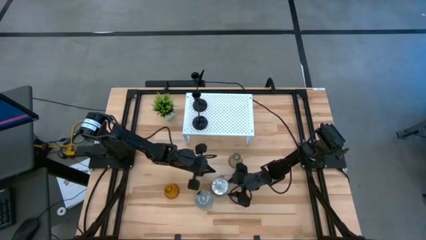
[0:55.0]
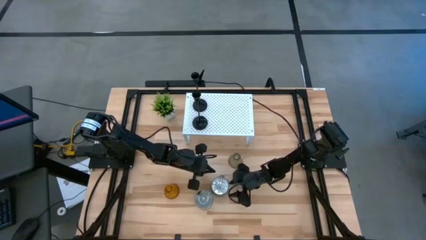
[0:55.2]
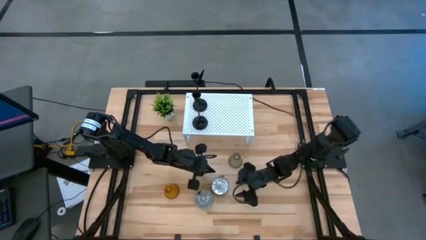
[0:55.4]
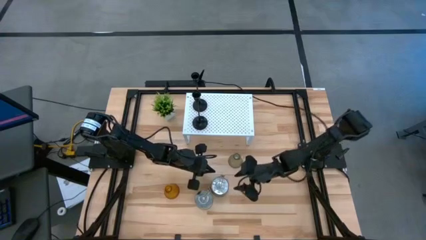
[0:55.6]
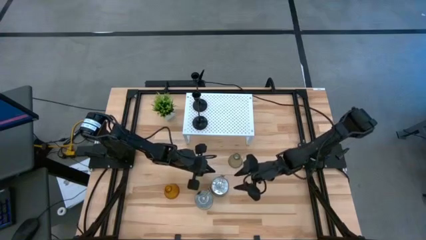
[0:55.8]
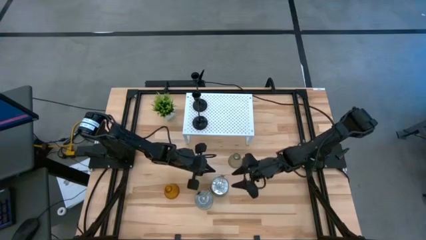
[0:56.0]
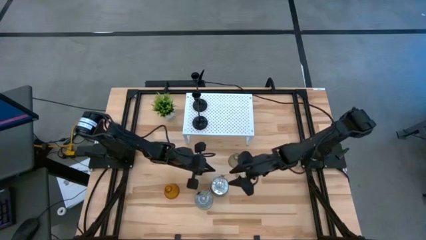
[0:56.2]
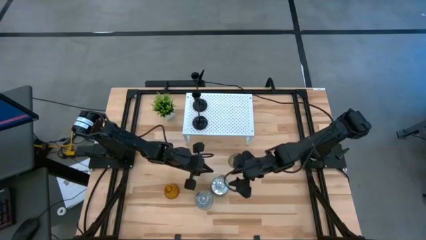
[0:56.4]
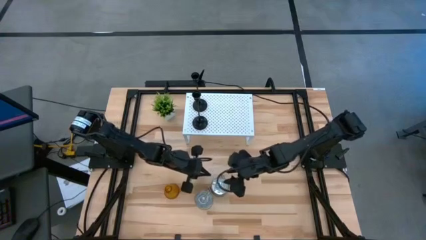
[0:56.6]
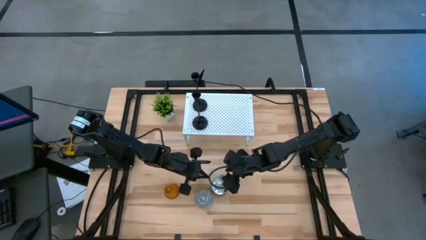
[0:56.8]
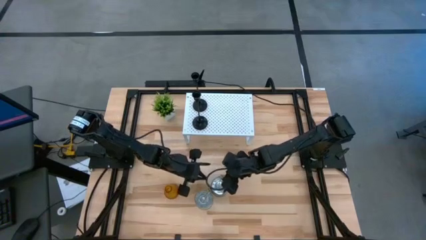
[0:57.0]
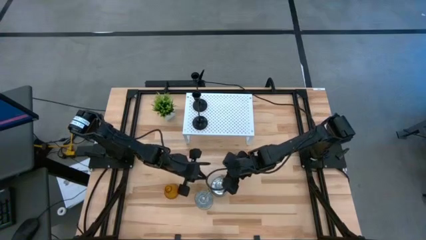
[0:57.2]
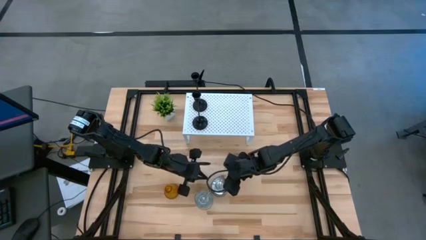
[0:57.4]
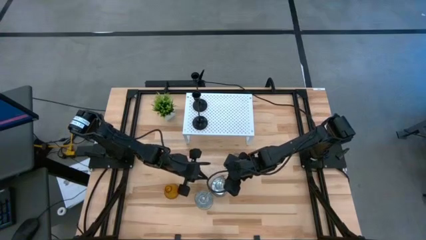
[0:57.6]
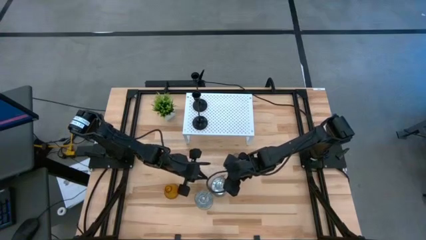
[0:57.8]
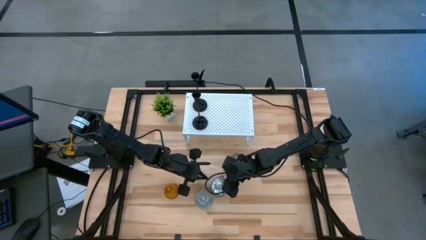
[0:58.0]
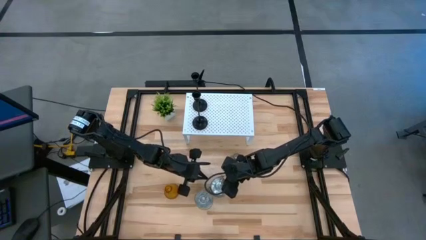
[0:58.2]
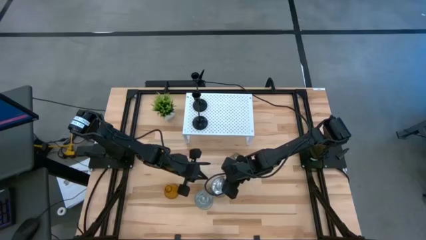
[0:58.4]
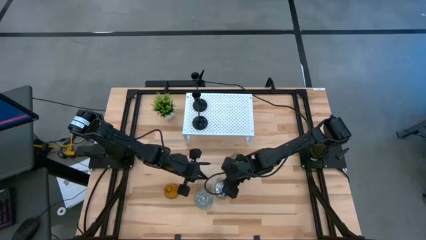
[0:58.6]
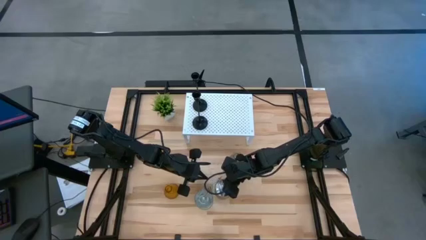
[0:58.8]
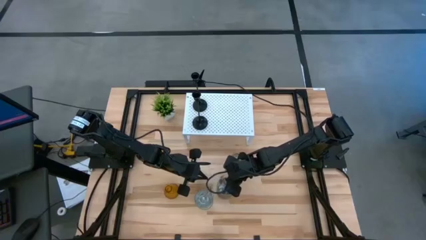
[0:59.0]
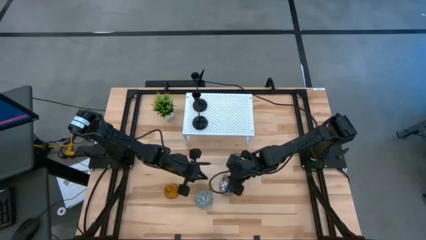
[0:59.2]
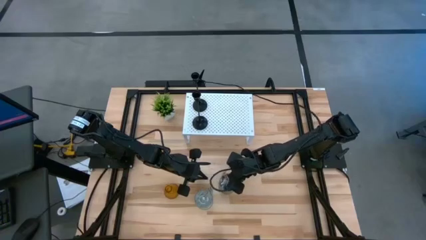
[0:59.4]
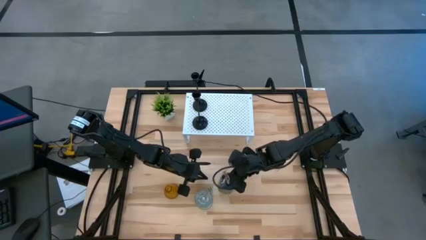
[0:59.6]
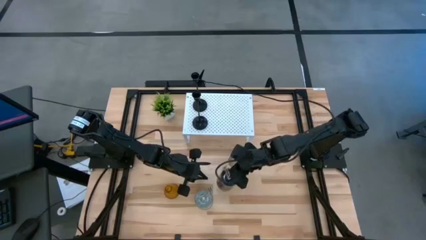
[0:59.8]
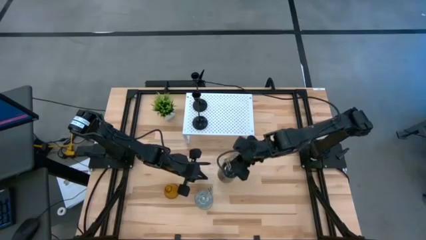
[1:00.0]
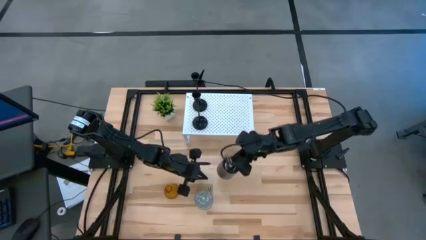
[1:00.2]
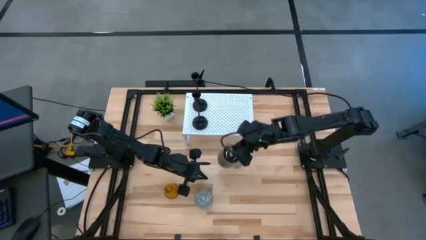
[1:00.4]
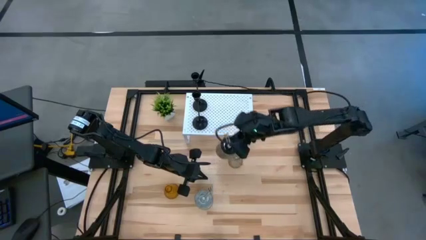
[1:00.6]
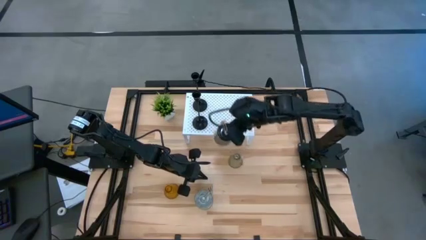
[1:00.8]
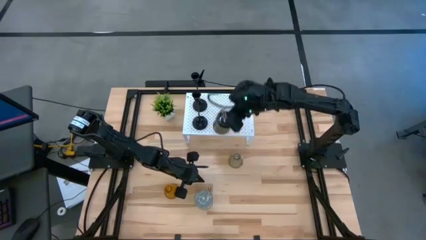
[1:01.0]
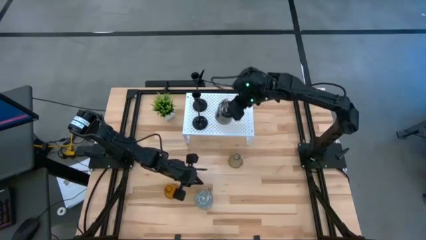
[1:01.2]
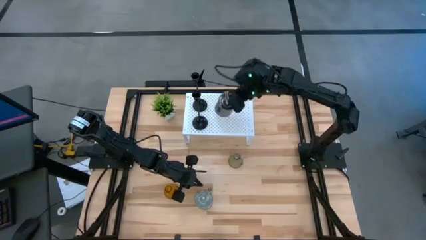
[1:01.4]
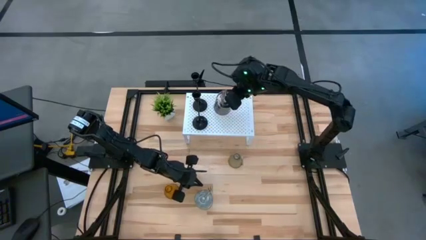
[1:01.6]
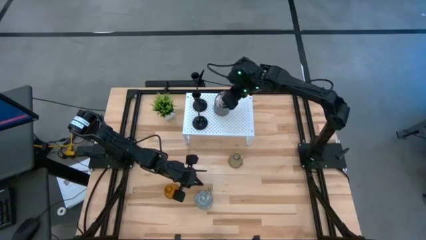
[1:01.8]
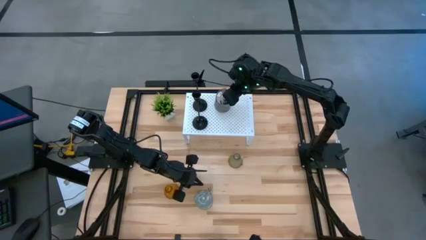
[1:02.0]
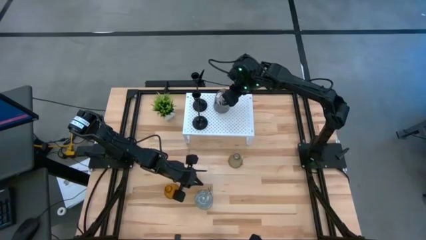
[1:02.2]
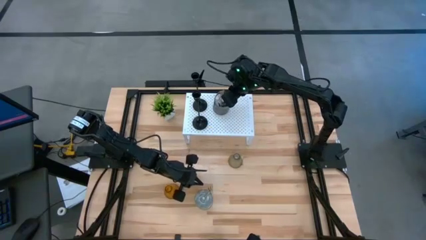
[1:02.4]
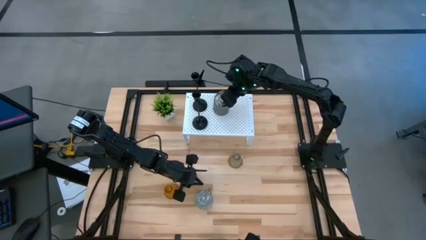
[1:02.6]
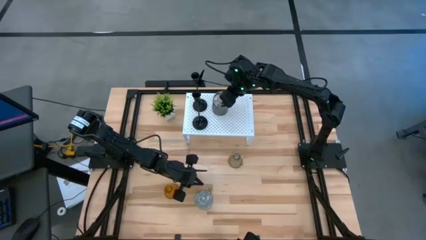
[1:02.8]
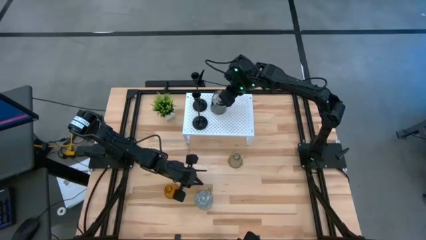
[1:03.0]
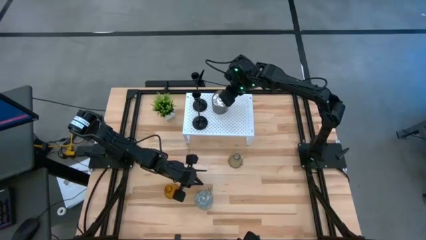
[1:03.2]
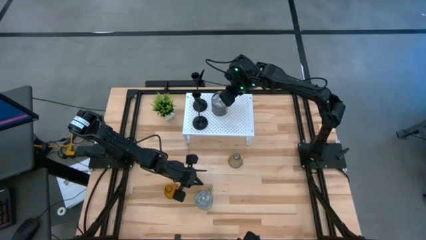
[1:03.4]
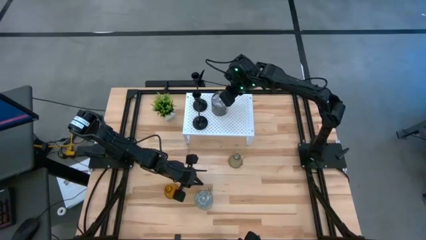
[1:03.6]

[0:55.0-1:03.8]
Task: Pick & Place candle stick holders
Put the right silver scented candle can on the shelf

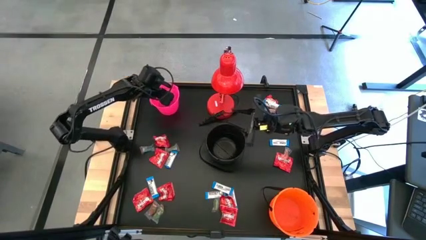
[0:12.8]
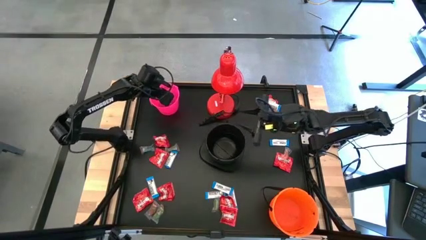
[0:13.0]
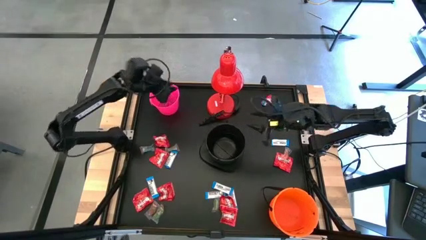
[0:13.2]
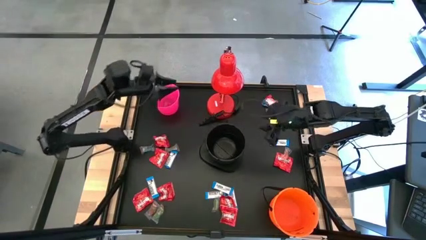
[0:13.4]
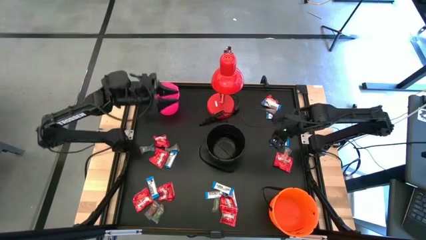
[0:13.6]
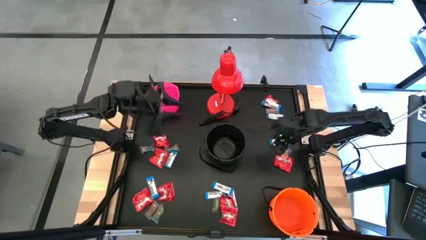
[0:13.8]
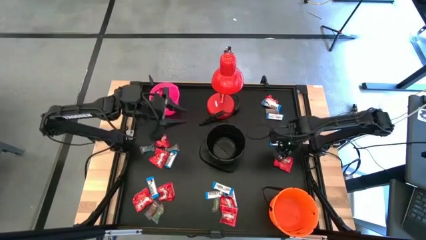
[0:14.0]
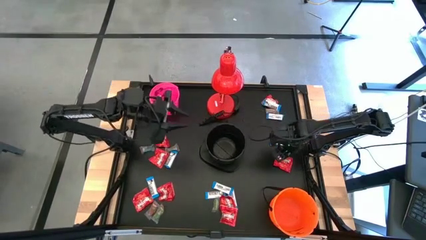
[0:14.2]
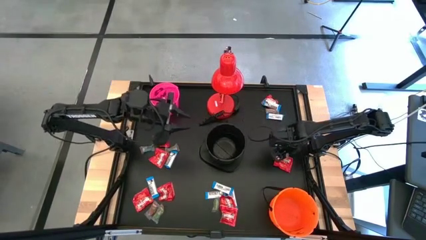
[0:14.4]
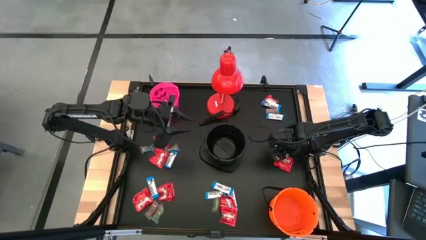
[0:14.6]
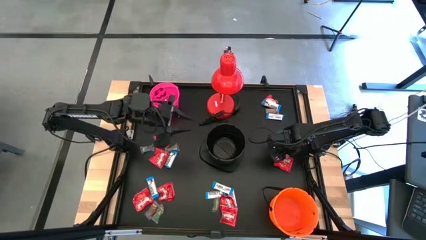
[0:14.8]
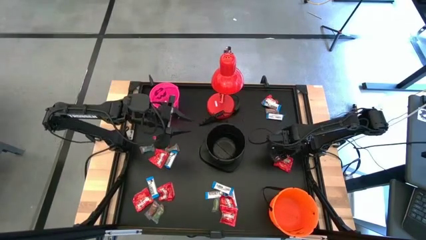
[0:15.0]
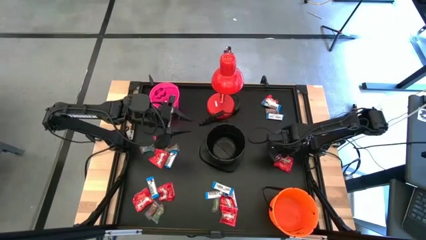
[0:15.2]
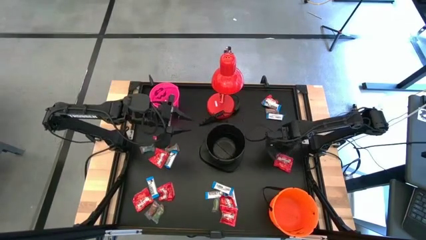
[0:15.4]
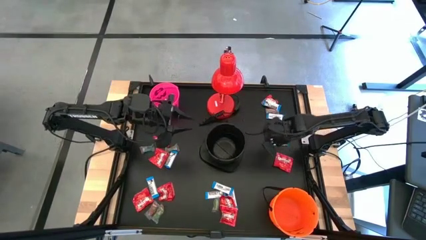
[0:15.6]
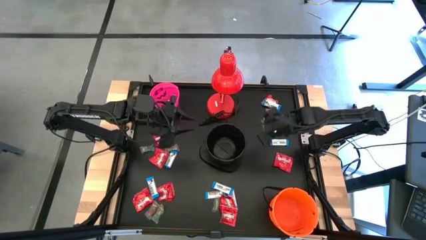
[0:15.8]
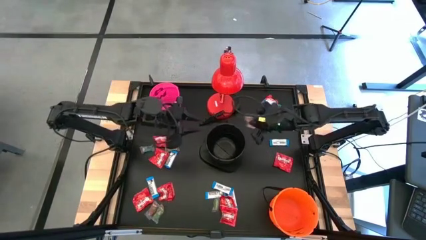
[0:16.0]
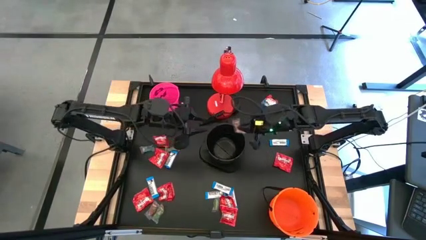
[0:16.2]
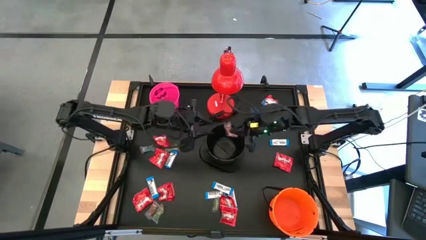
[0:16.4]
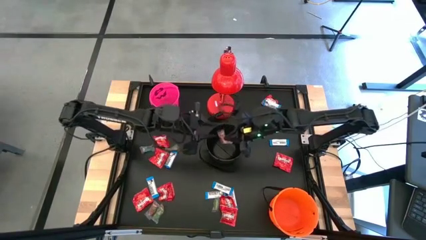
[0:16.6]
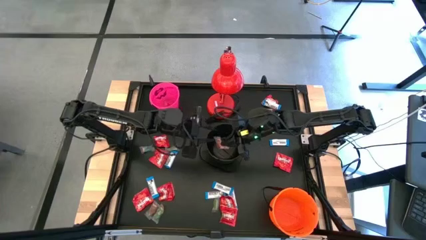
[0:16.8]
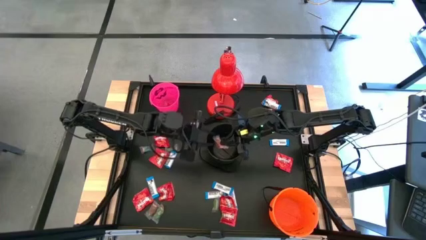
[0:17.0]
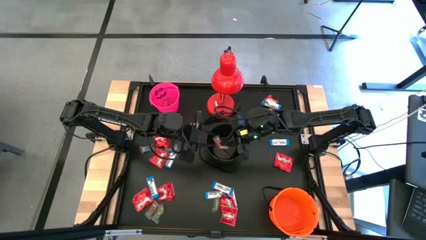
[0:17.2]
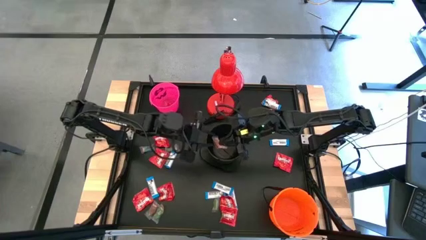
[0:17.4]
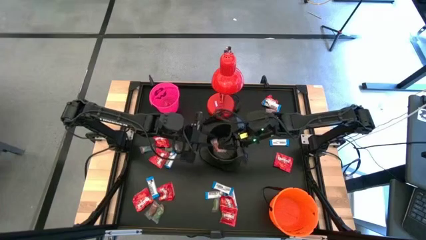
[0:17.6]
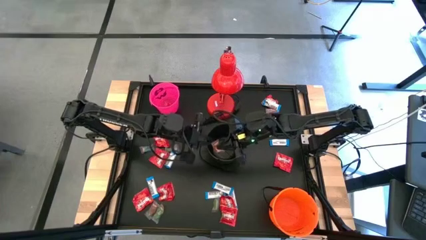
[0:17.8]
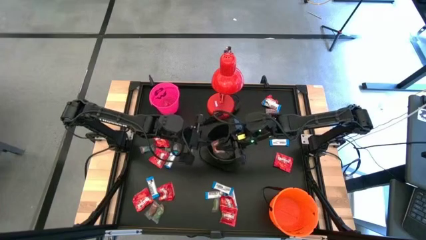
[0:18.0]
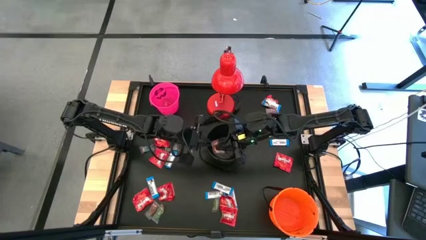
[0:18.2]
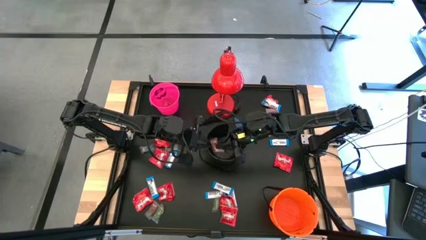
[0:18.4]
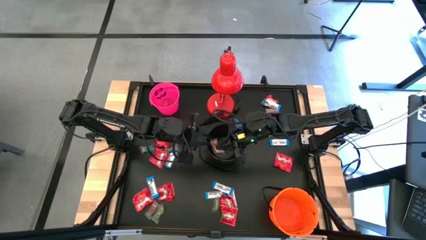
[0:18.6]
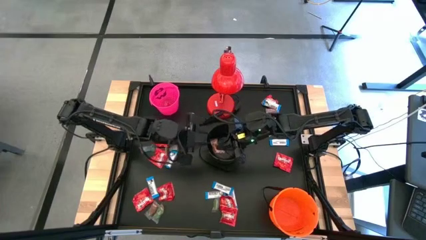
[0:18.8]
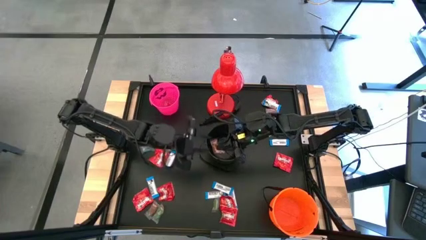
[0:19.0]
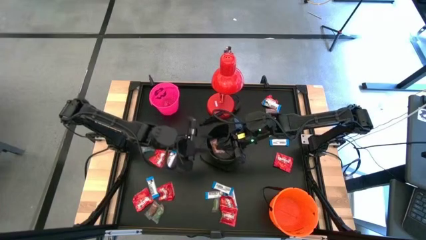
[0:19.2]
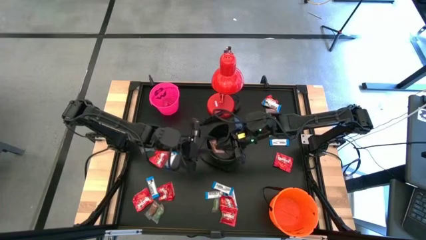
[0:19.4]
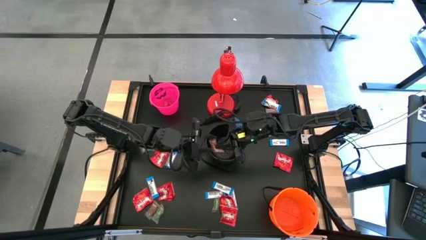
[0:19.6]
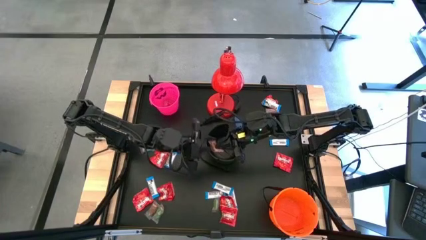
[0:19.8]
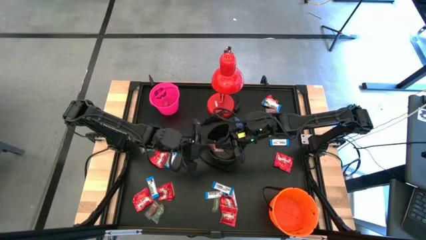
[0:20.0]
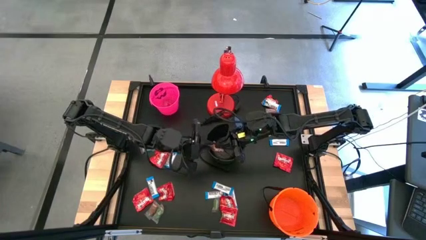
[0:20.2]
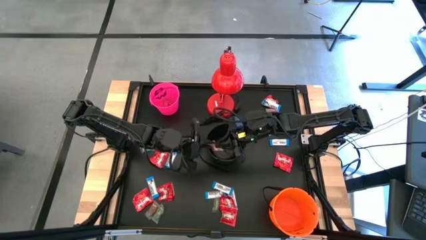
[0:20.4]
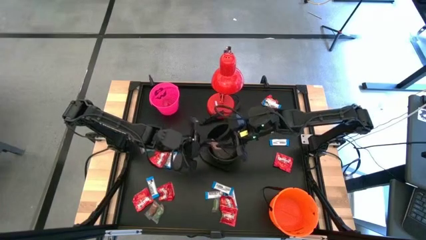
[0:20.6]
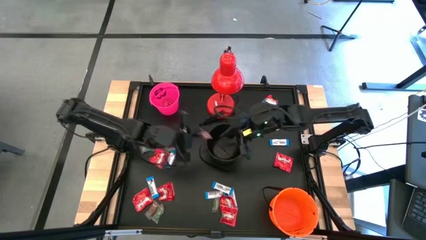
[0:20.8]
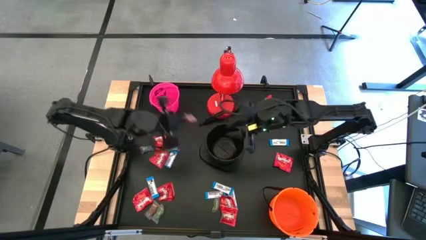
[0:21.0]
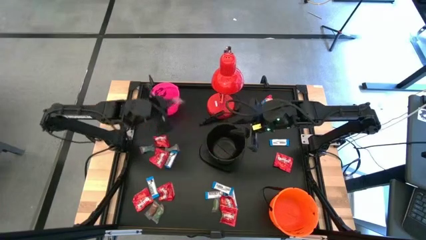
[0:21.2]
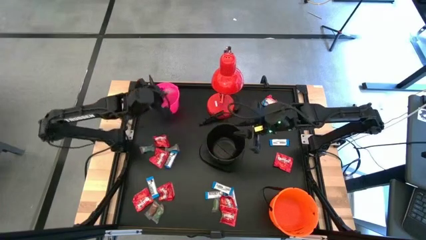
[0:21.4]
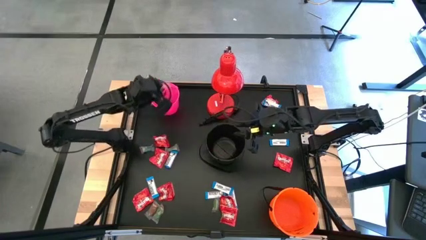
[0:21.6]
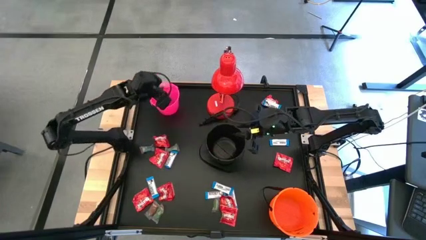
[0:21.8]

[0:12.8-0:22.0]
Task: Organize candy in baskets
Put the orange gummy into the pink bucket
